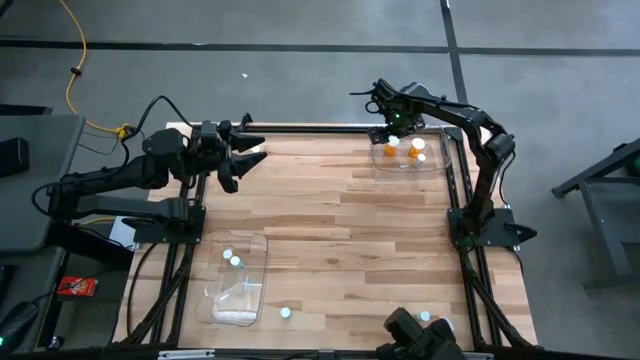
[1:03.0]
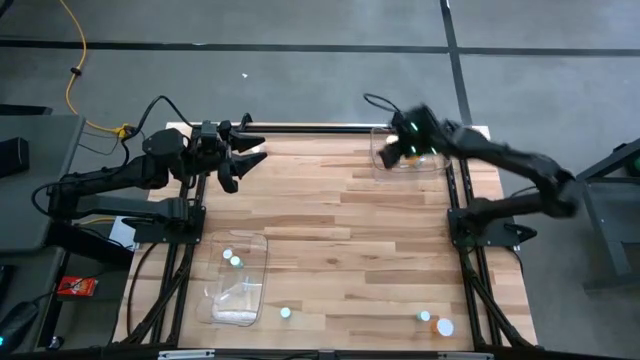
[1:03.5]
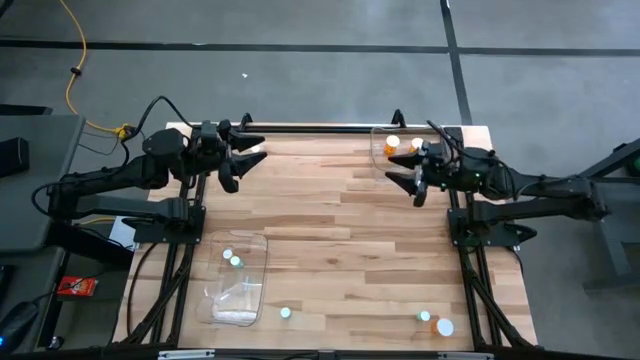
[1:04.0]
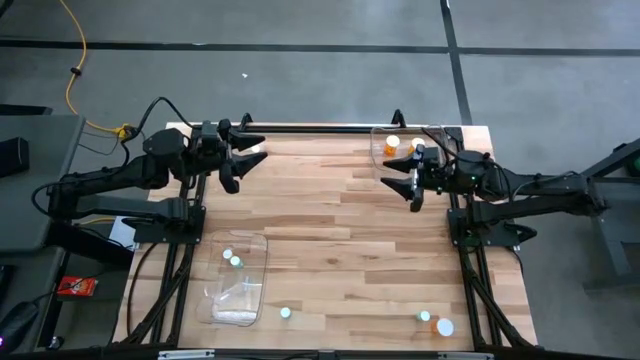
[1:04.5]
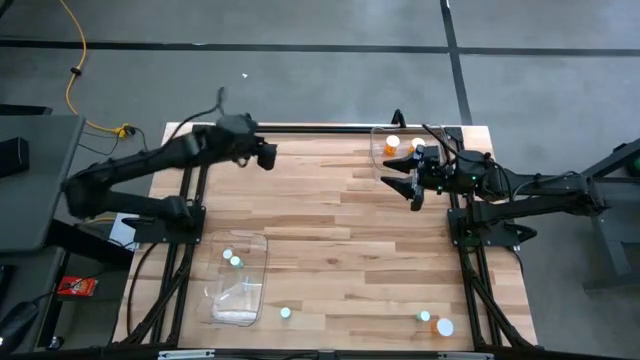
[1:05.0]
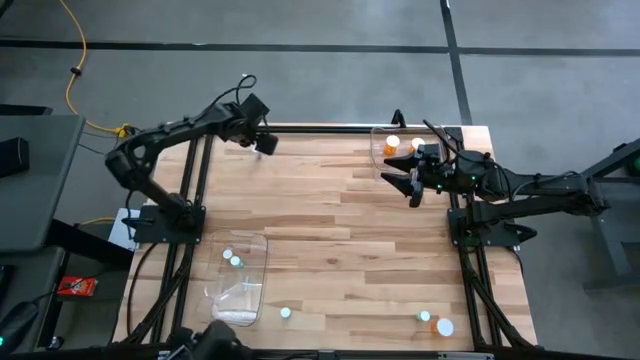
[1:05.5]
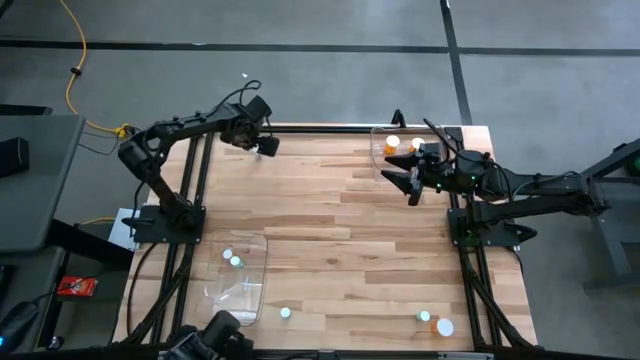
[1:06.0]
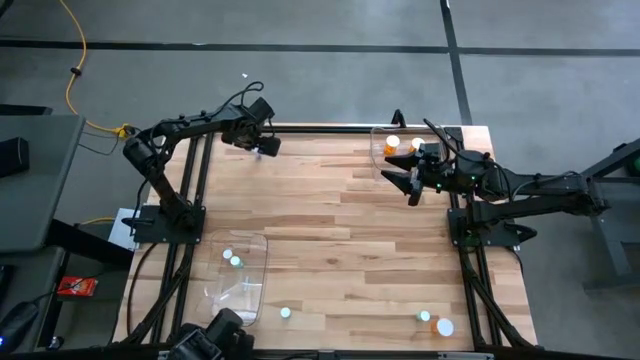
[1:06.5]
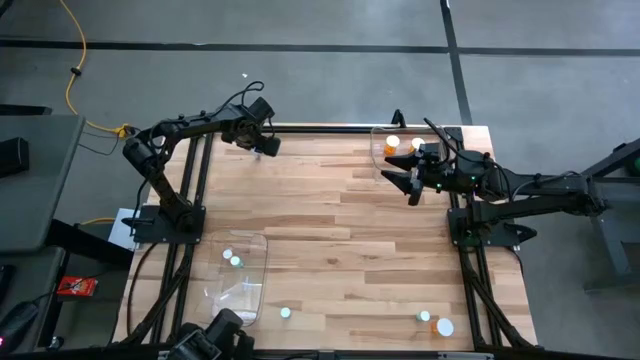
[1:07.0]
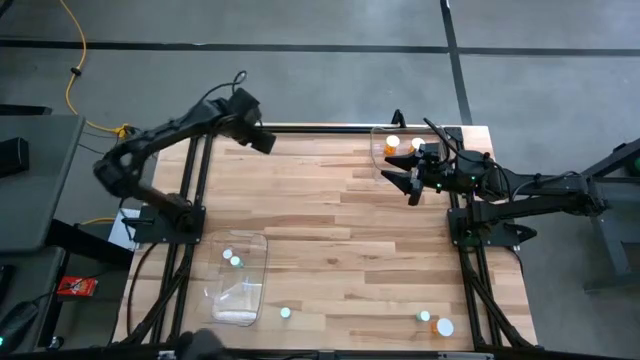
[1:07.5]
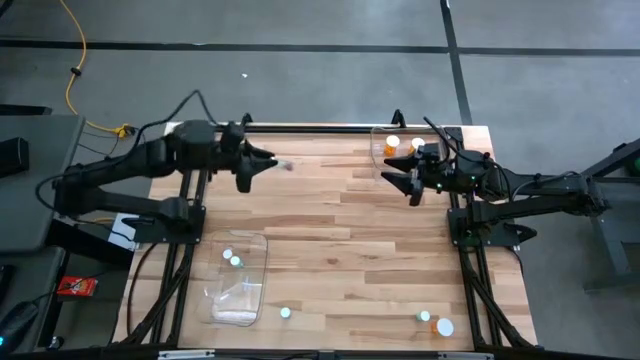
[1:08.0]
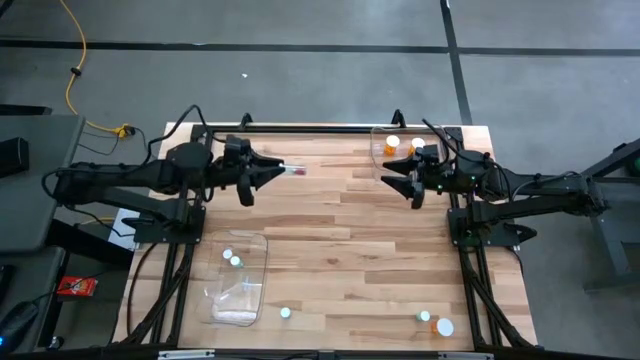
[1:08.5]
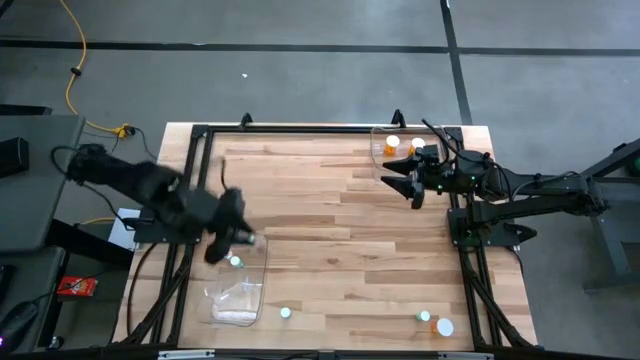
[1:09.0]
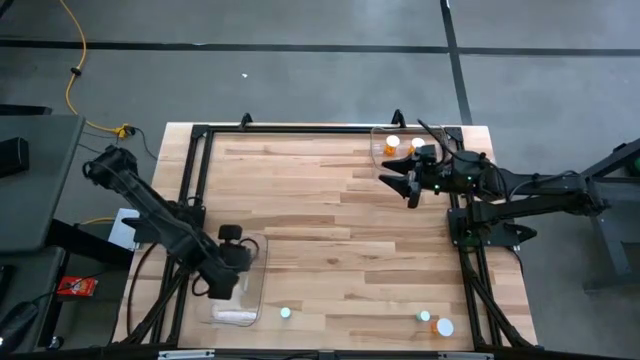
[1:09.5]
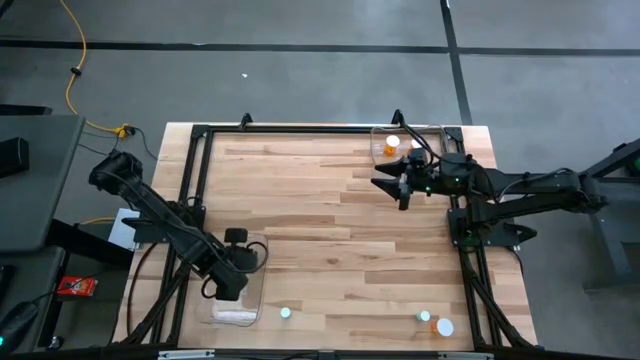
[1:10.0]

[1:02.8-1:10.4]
Task: Pick and place medicine bottles into bin by pill shape (circle, oval)
Put the green capsule bottle into the top transparent bin

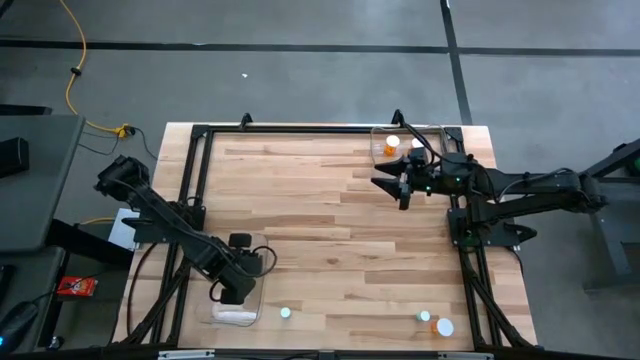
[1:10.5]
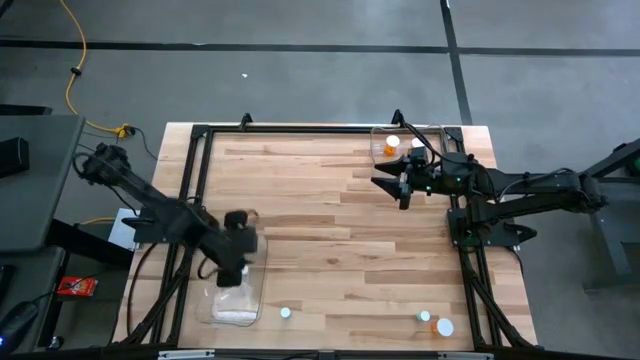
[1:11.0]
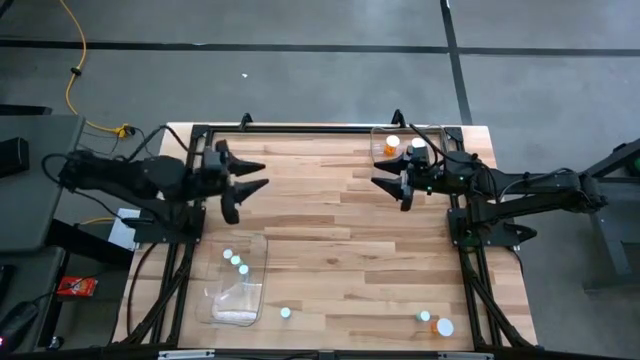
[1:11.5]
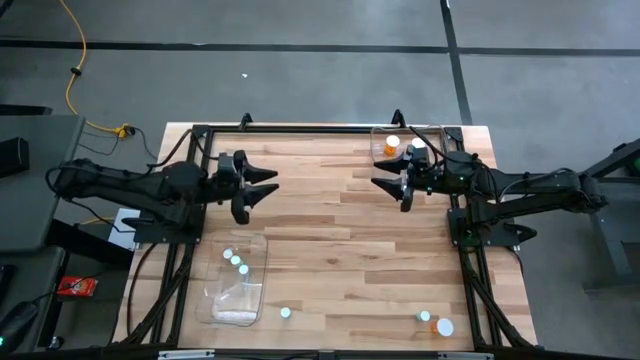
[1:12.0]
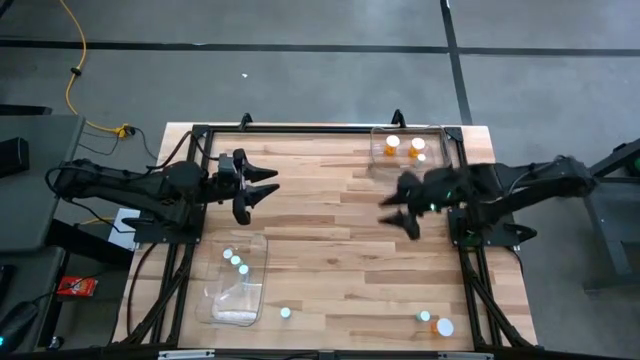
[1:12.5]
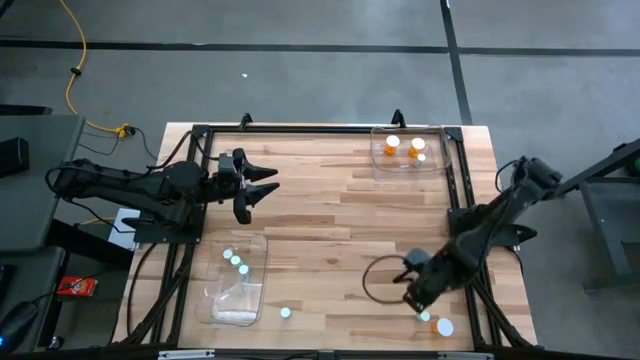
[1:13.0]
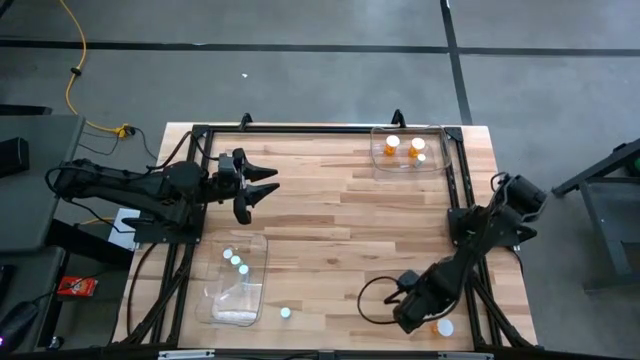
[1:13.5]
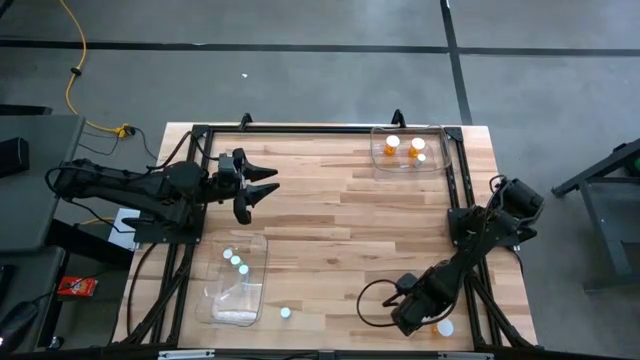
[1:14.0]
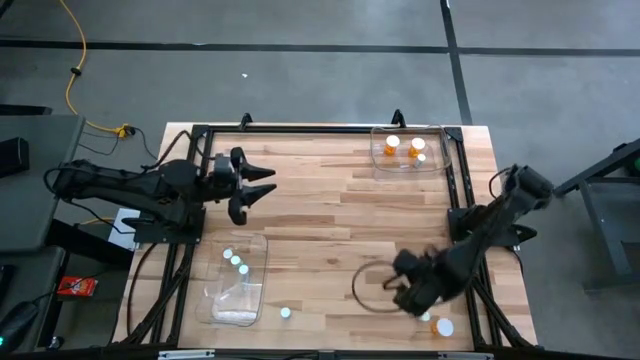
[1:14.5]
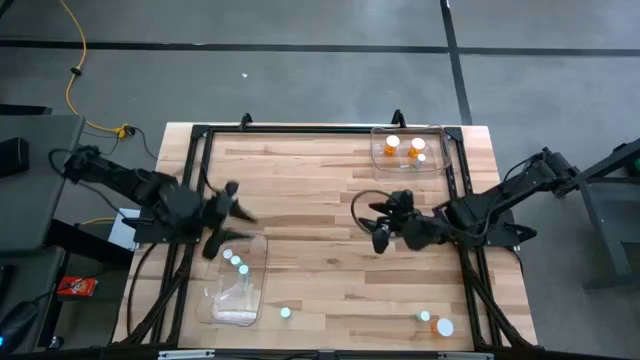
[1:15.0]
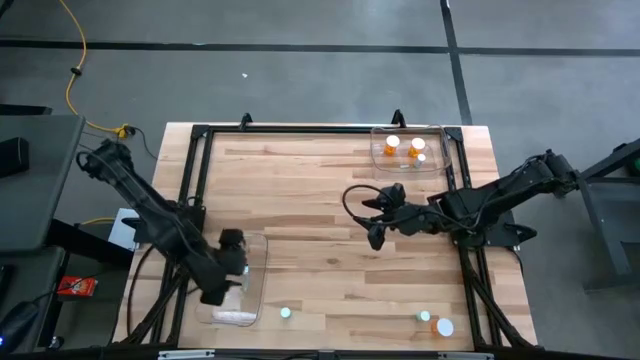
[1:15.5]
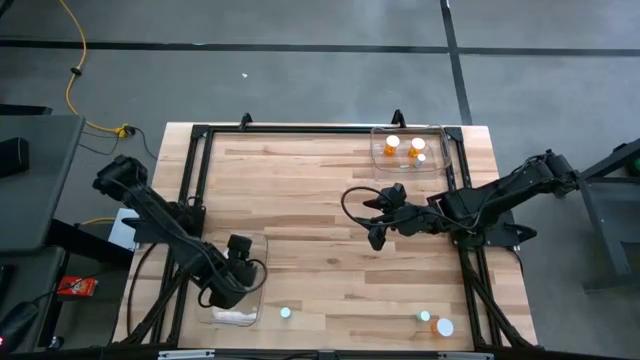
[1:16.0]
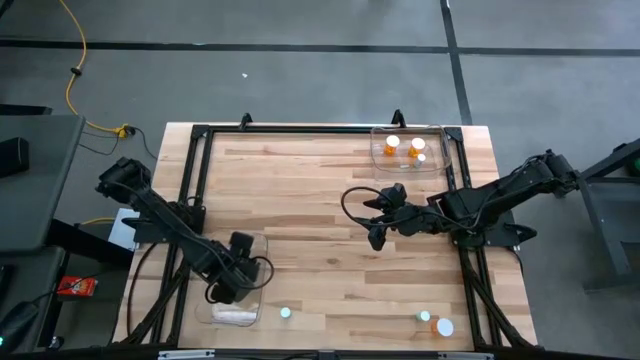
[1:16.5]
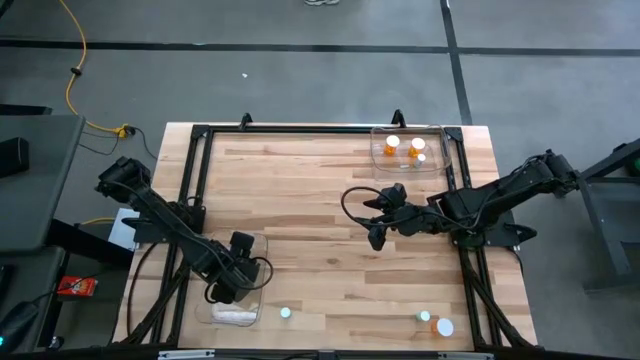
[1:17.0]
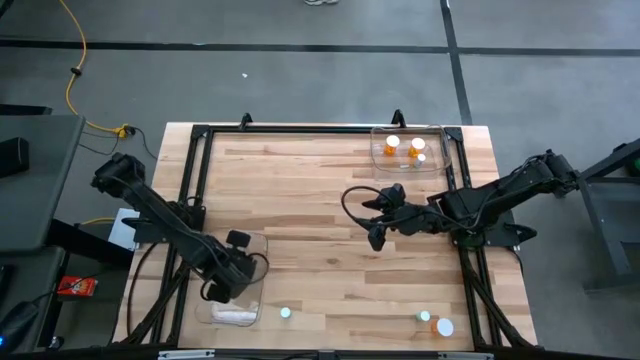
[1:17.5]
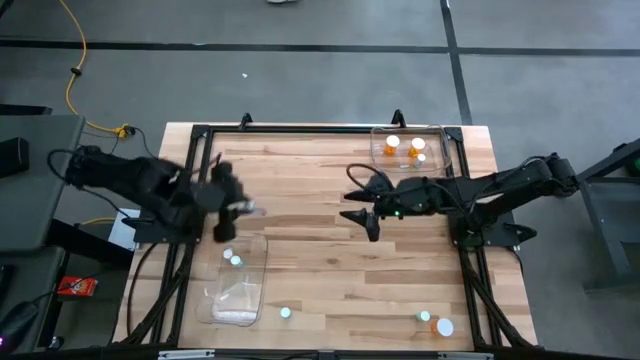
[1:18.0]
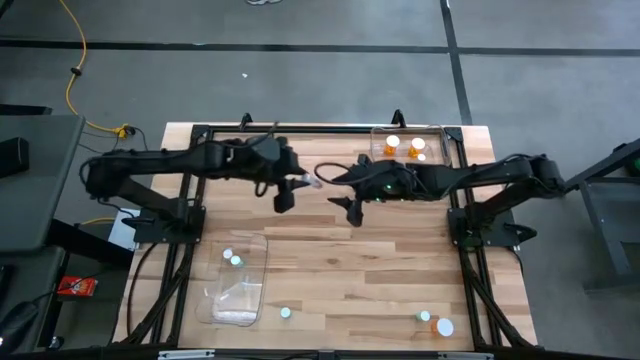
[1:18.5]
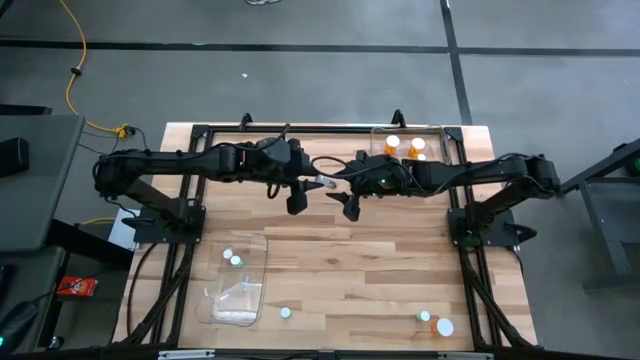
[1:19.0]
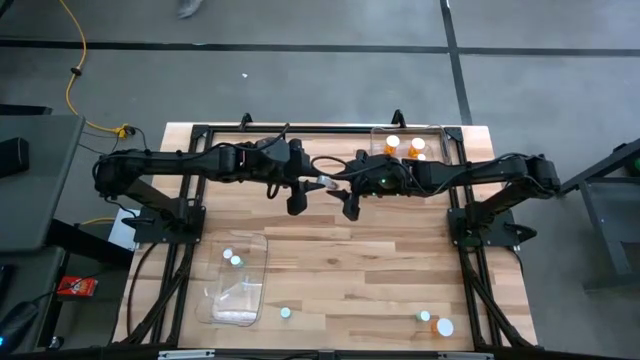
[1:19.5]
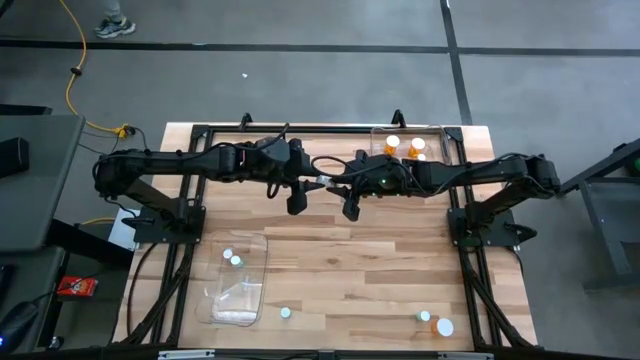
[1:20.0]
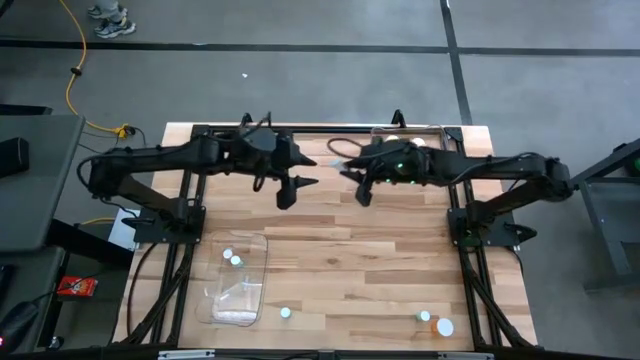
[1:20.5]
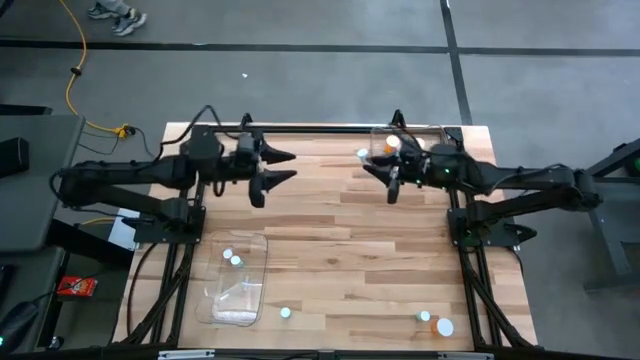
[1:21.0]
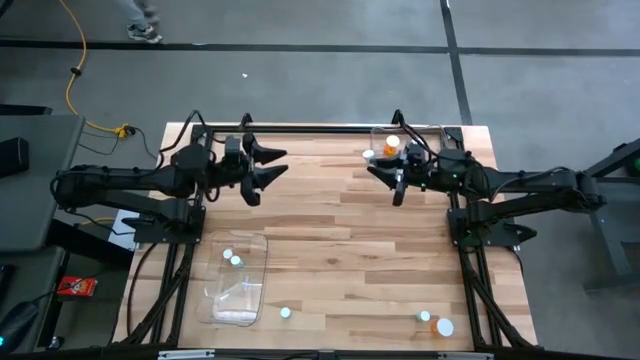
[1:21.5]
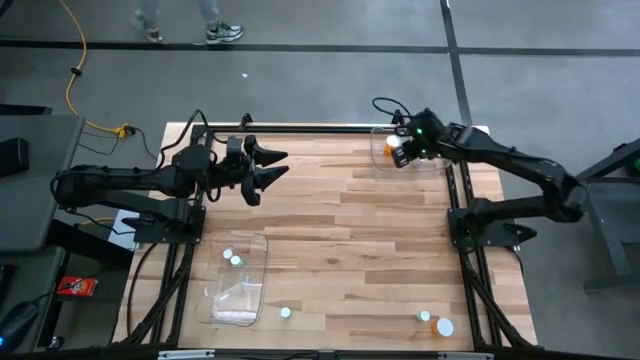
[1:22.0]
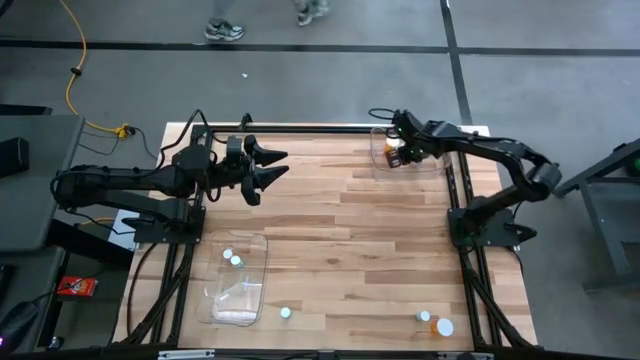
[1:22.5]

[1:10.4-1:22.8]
Put the green capsule bottle into the top transparent bin

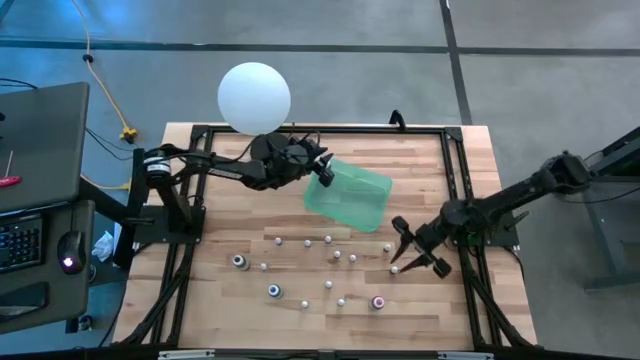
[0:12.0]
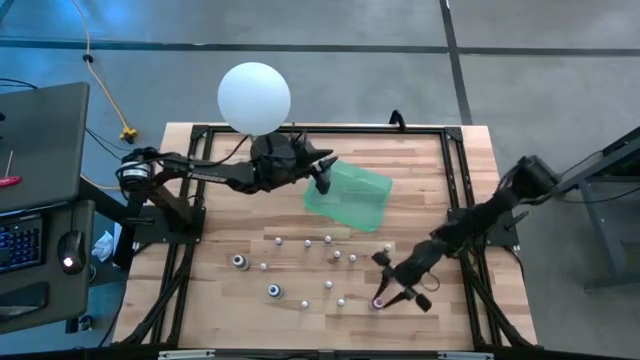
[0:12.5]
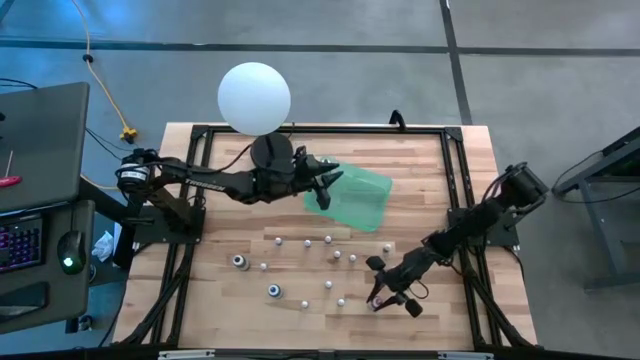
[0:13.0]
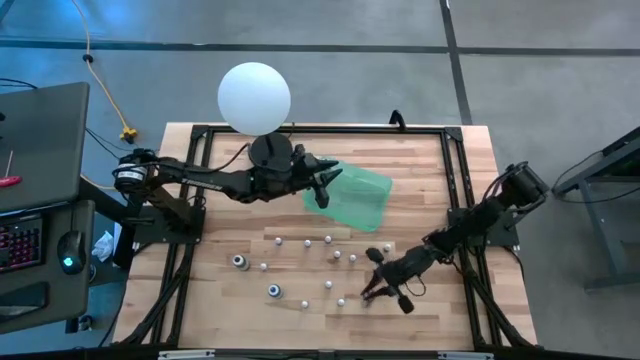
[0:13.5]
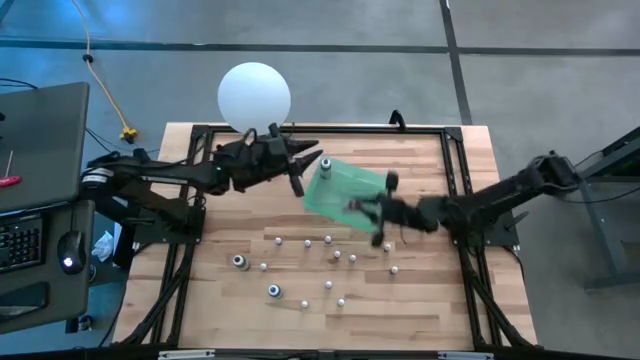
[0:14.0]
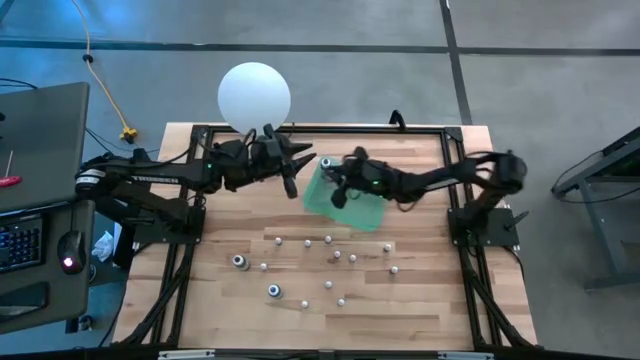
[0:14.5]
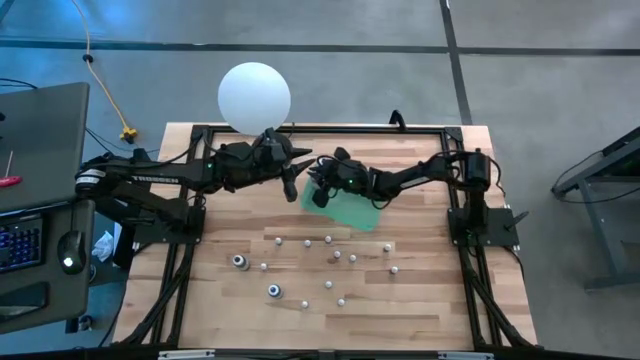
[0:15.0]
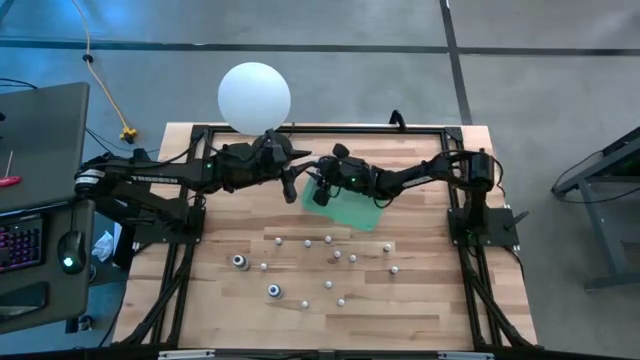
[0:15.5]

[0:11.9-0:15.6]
Task: Pick & Place food coloring
Put the large pink food coloring bottle into the green container
